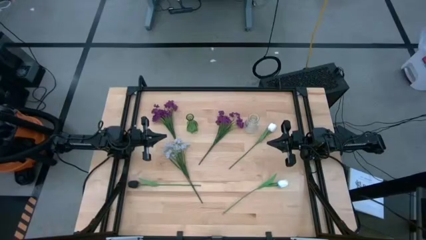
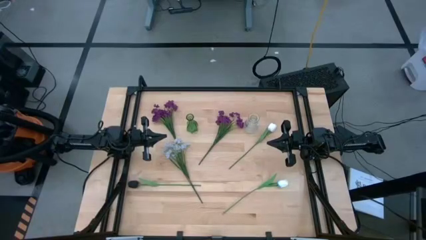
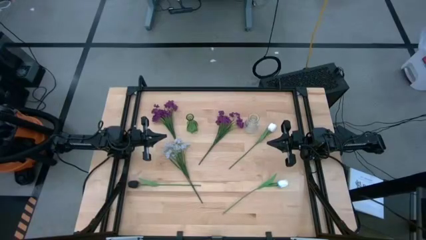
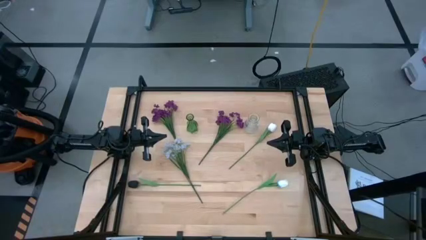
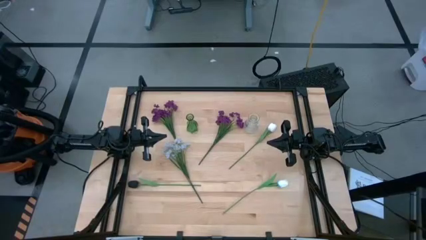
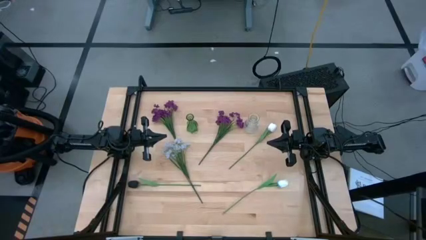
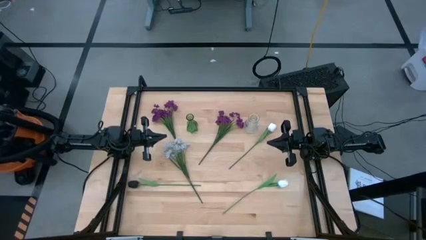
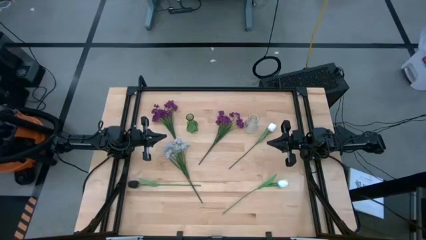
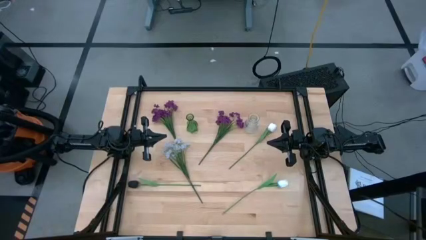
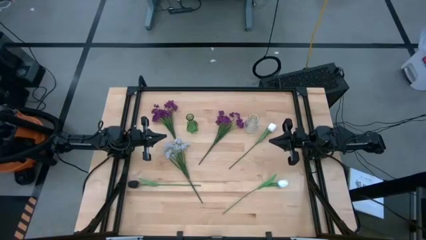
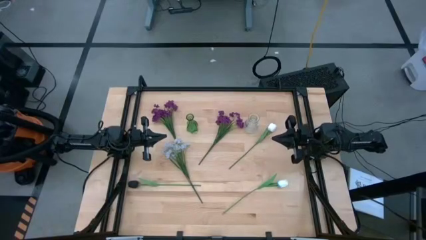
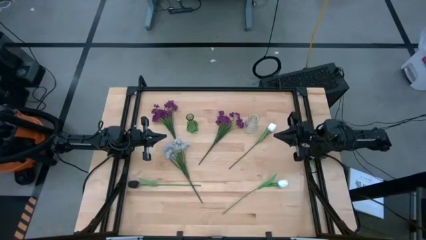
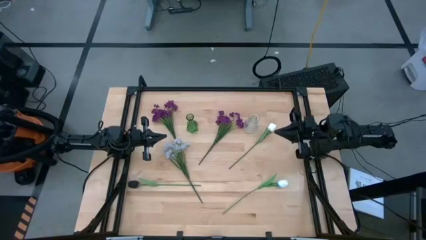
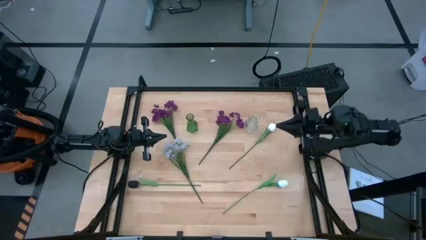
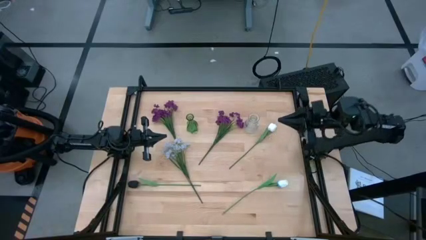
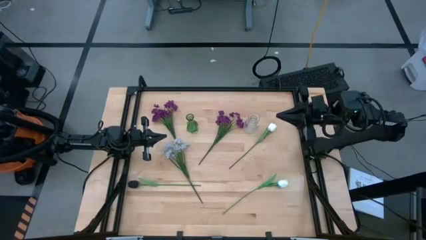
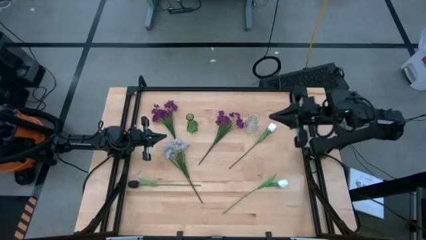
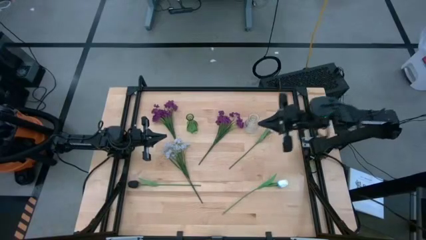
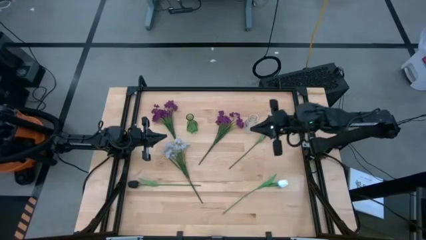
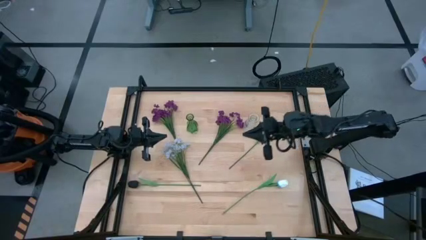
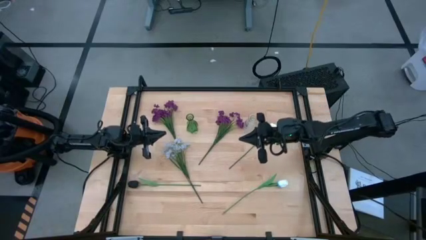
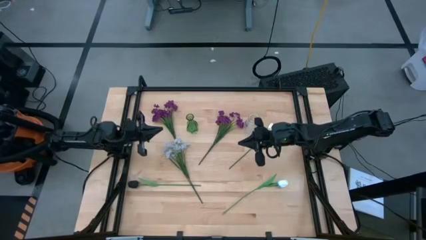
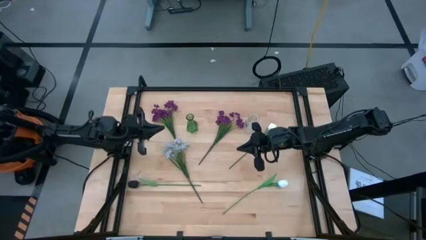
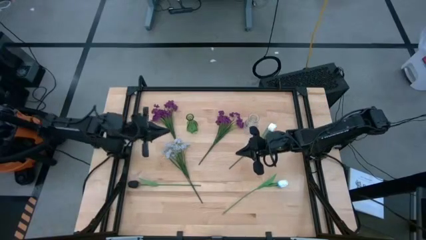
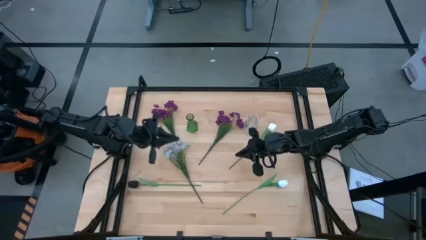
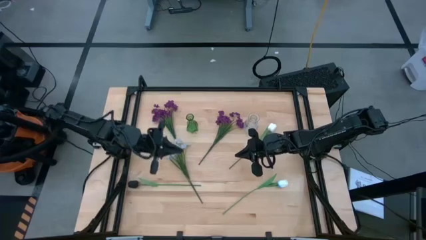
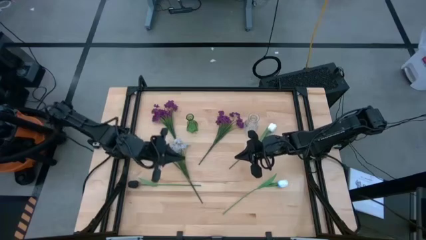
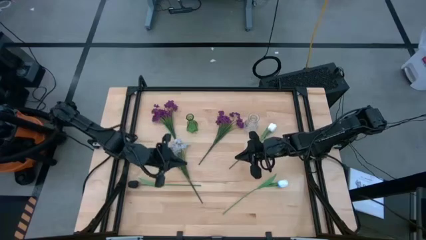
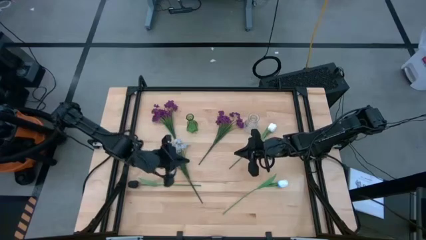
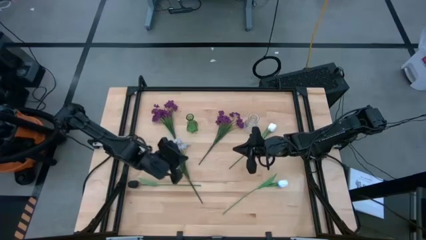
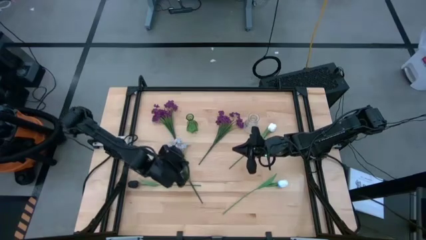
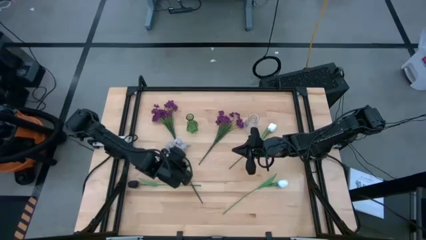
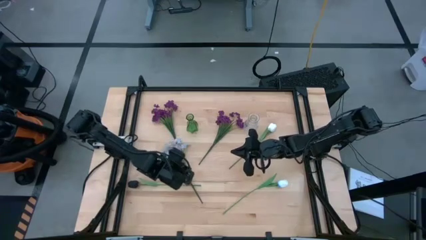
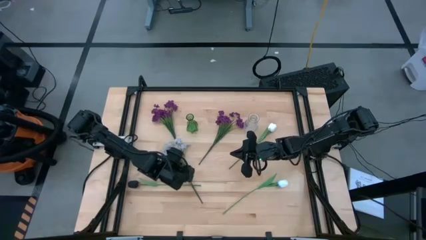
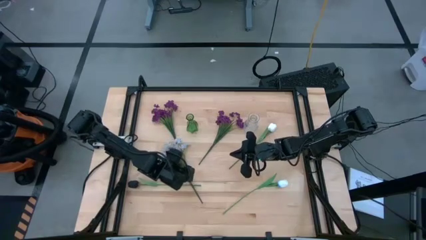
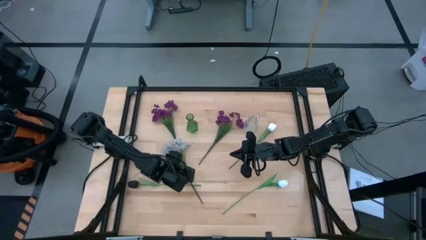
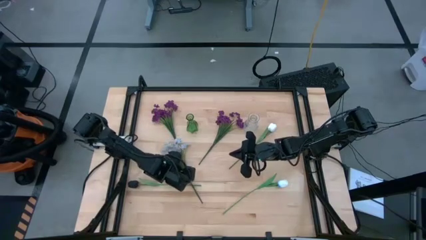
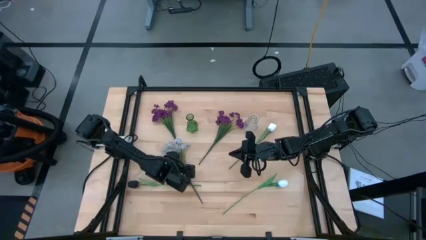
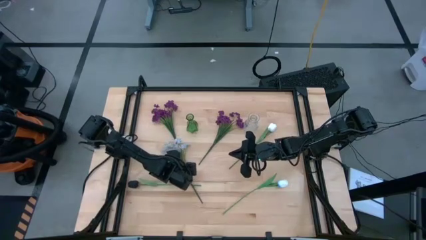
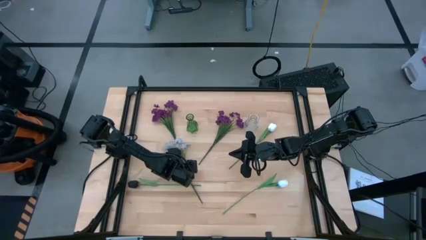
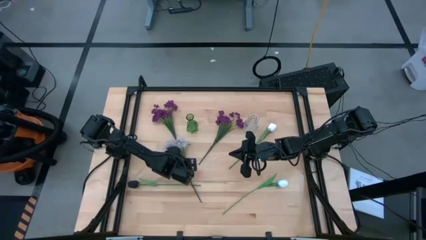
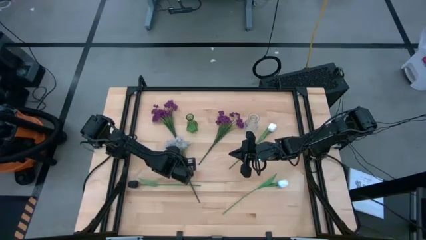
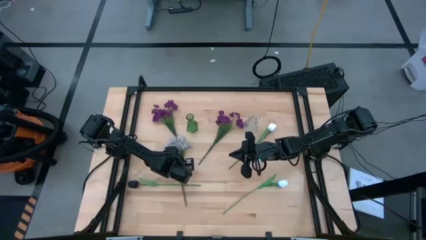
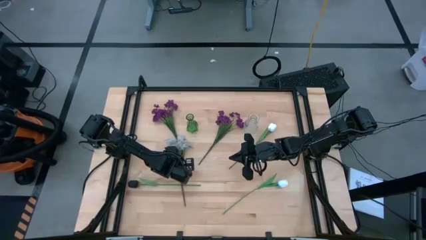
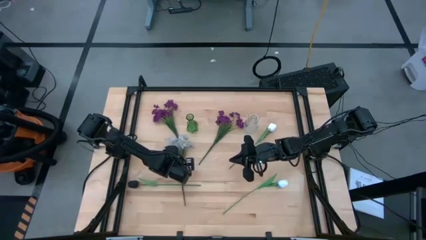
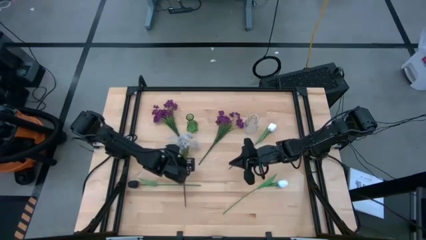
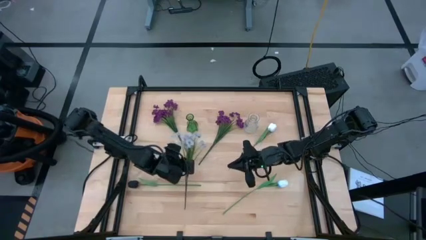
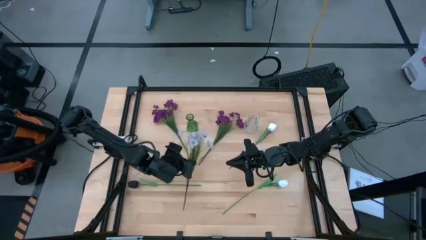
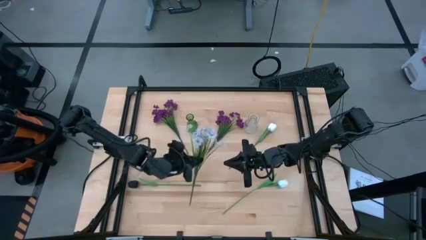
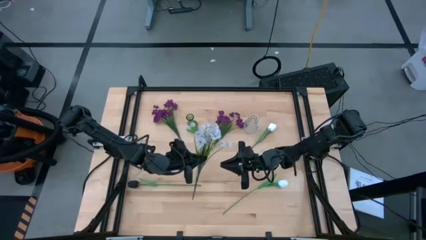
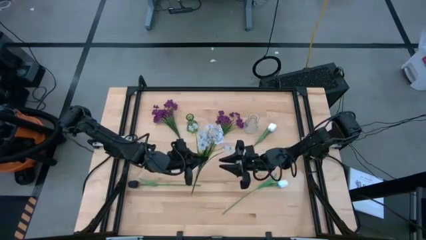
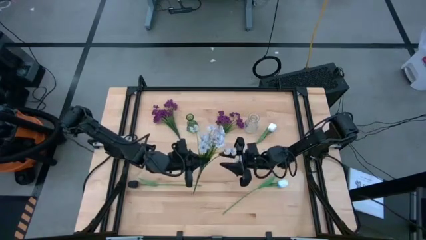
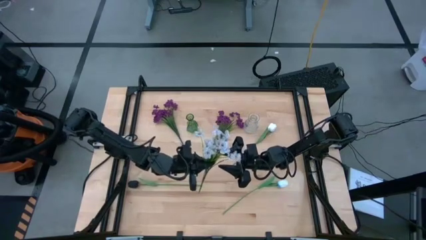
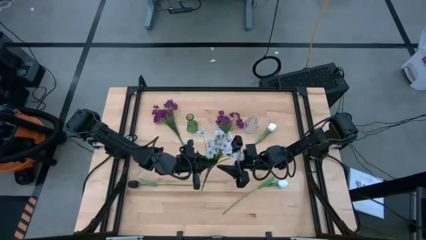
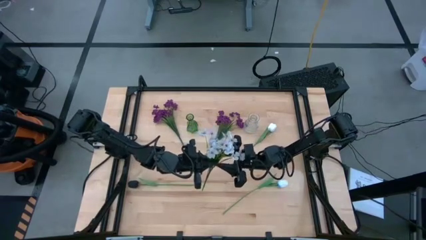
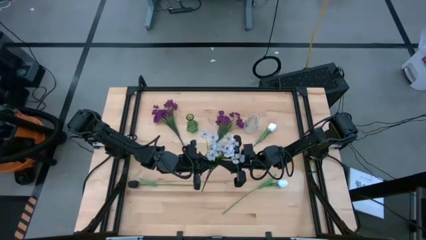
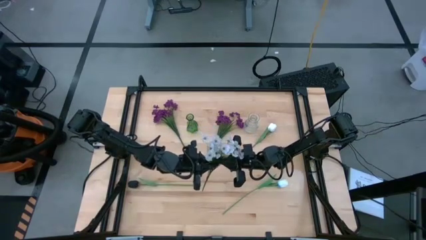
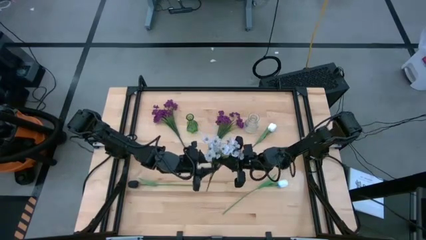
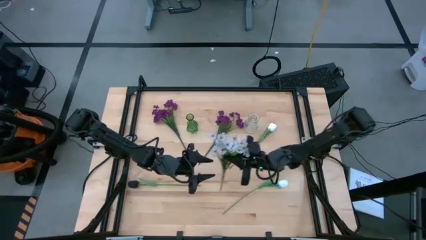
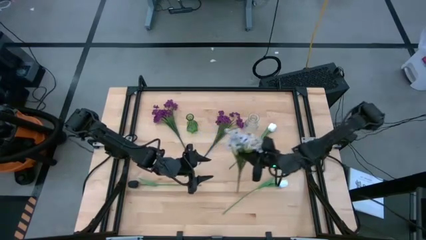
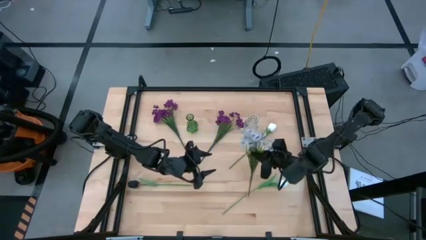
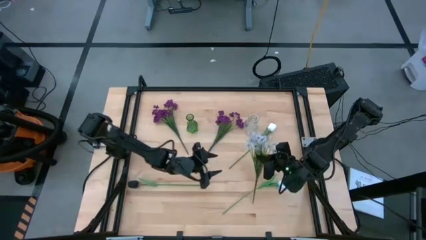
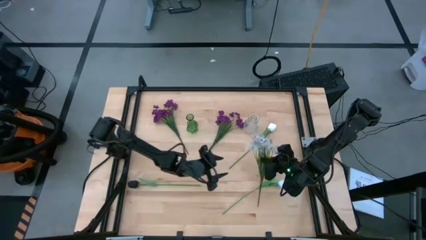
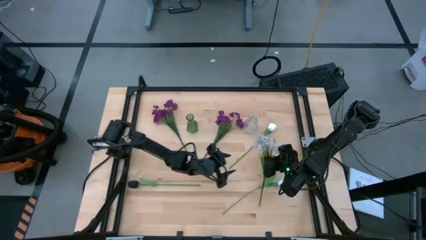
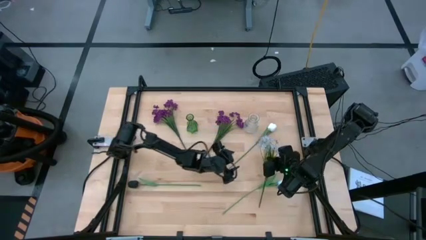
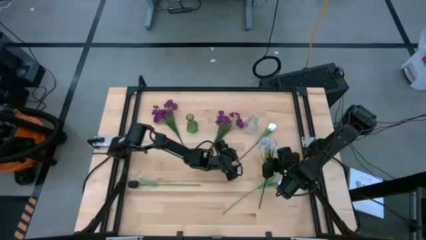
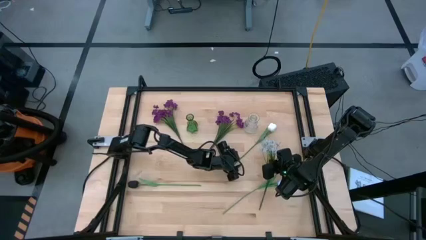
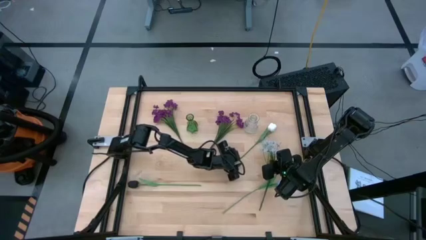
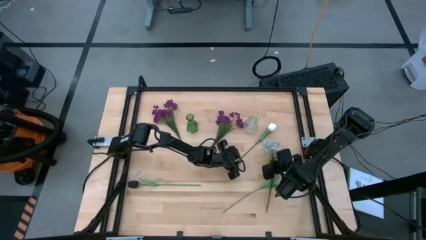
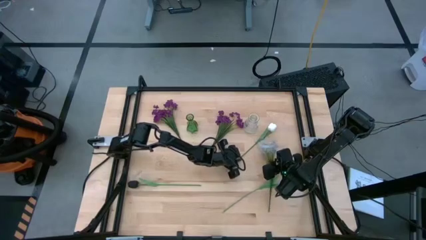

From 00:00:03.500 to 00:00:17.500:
Task: Sort flowers into vase by color
Move the white flowers to the right of the table

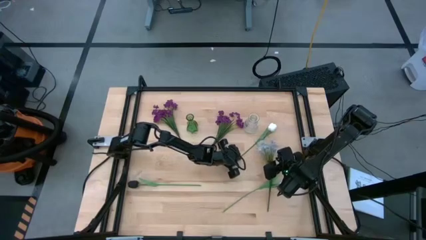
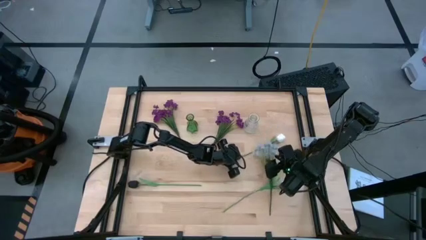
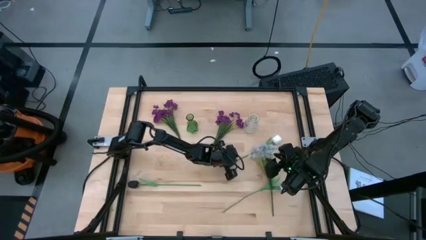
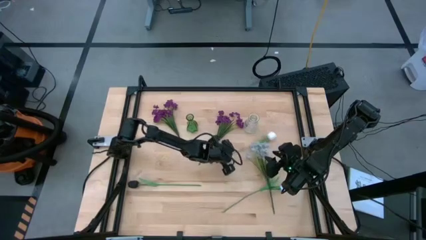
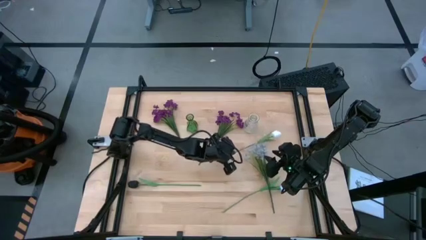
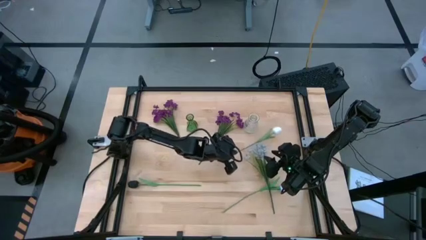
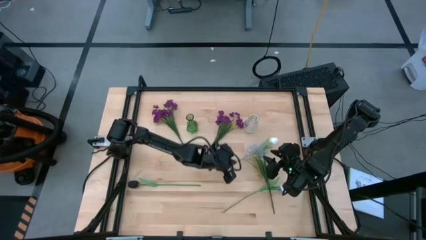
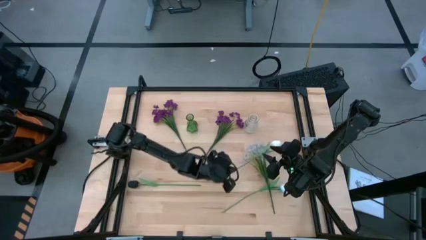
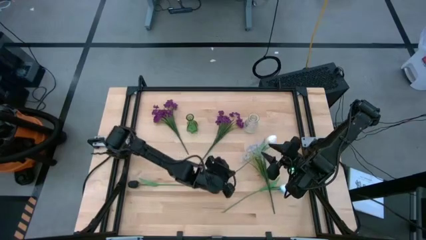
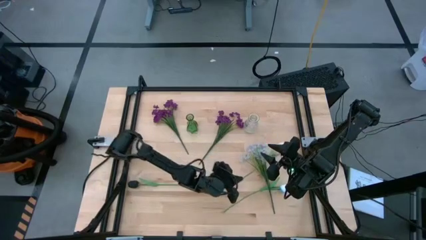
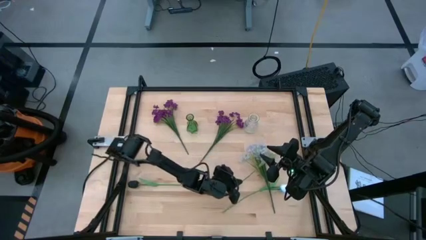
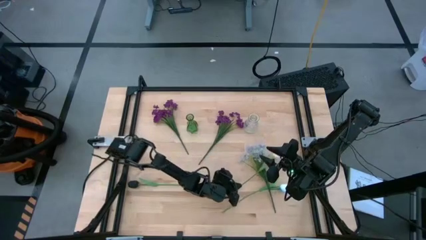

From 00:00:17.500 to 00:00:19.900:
Adjust the white flower
